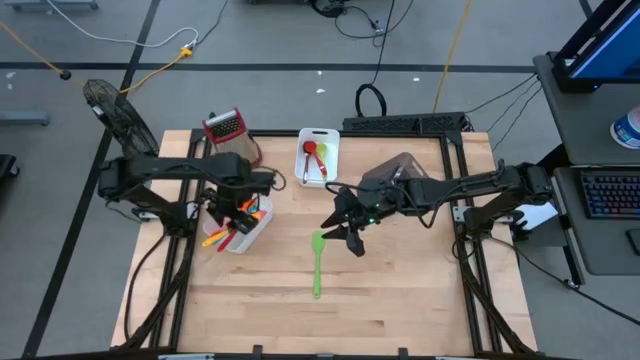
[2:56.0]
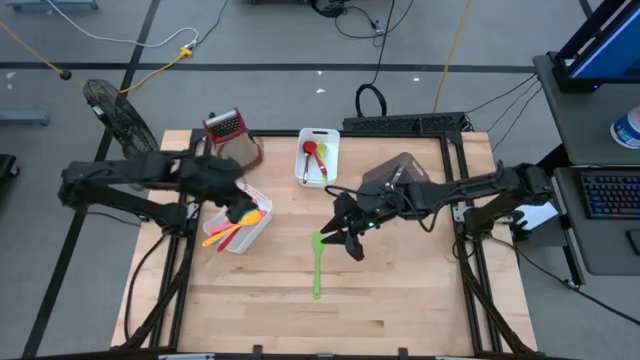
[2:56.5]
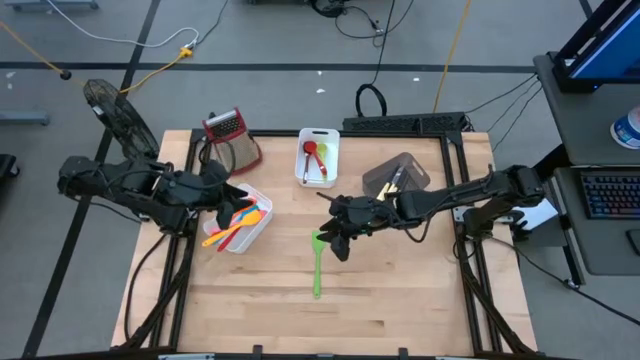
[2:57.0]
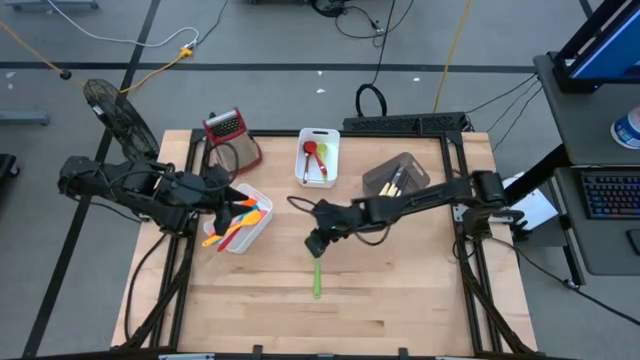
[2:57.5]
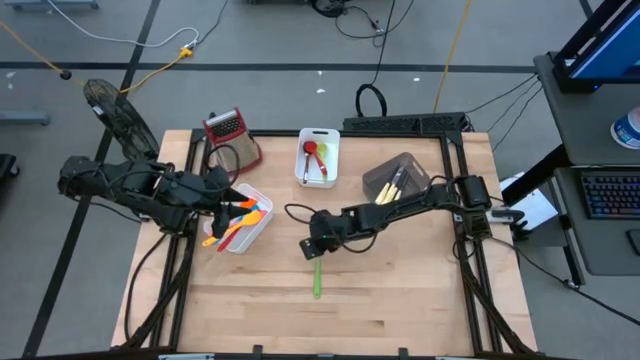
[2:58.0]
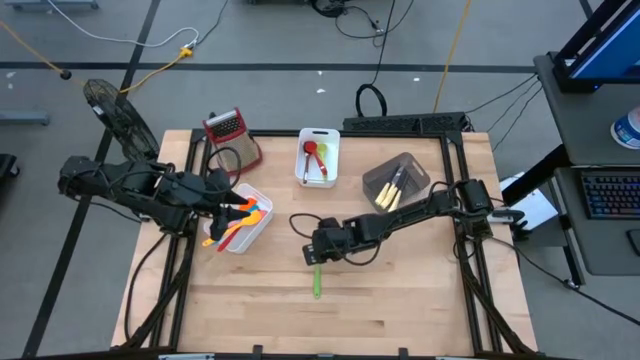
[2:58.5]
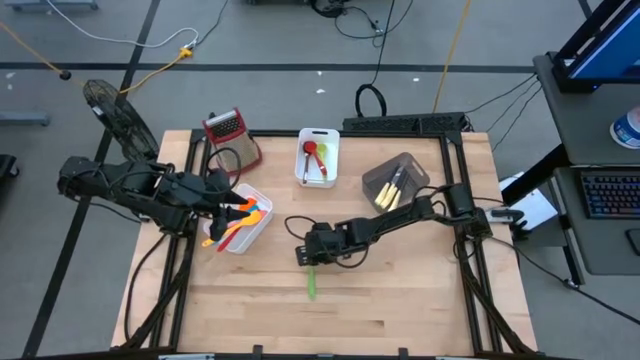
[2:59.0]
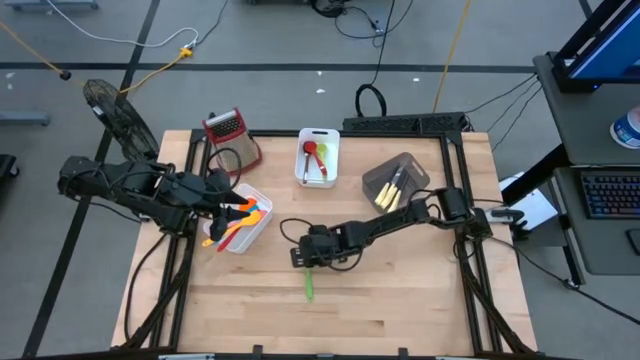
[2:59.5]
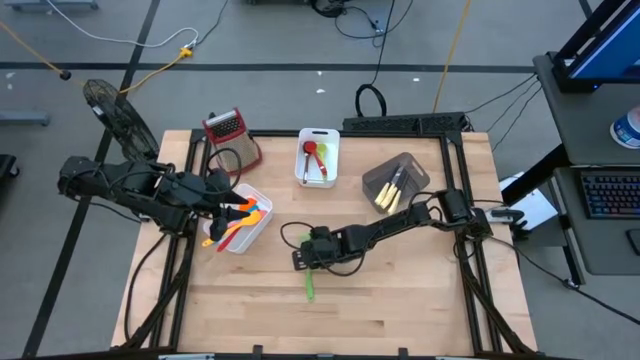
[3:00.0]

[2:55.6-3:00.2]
Task: Pick & Place Kitchen Items
Put the green spatula into the bottom white bin

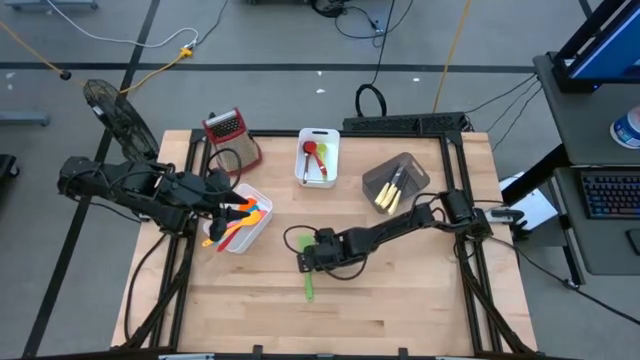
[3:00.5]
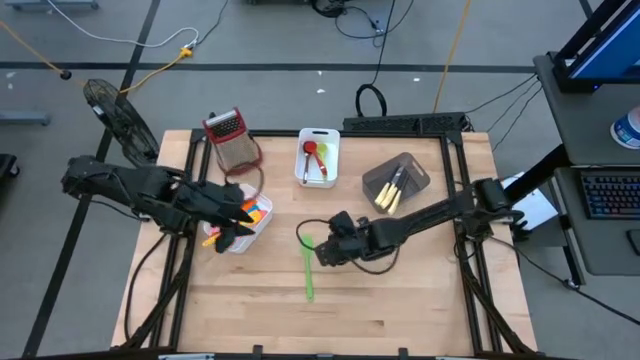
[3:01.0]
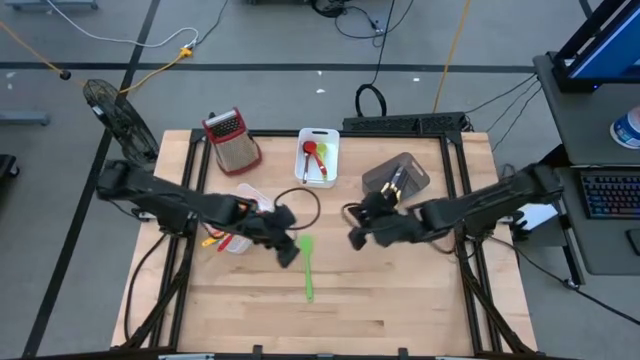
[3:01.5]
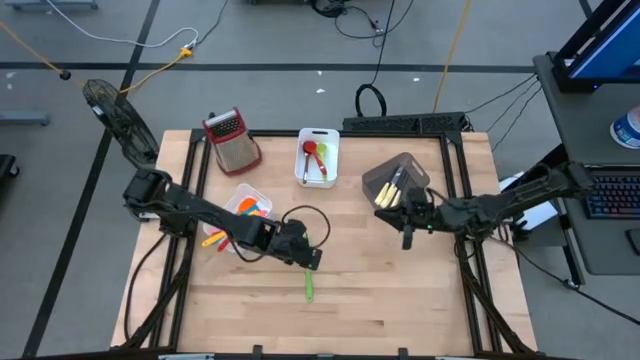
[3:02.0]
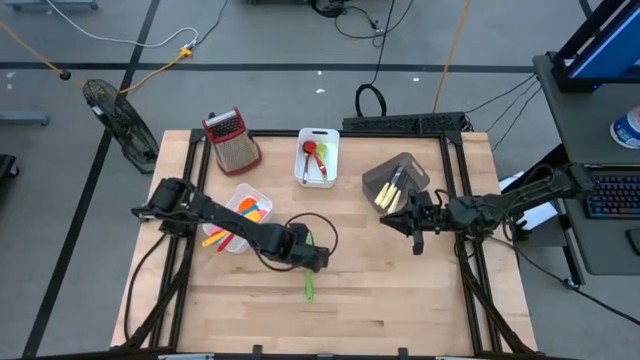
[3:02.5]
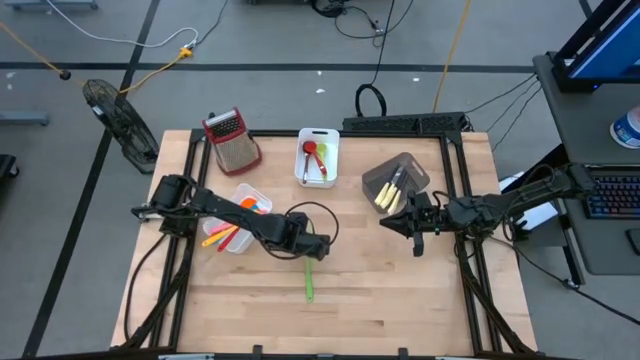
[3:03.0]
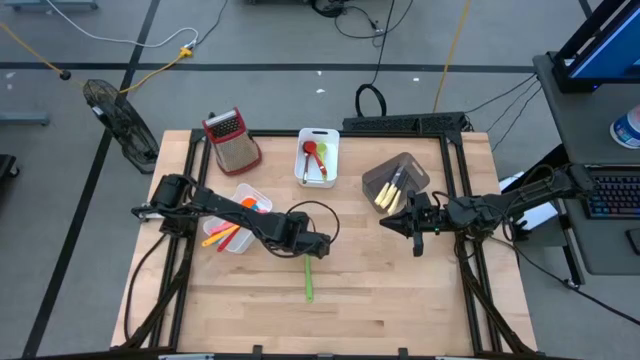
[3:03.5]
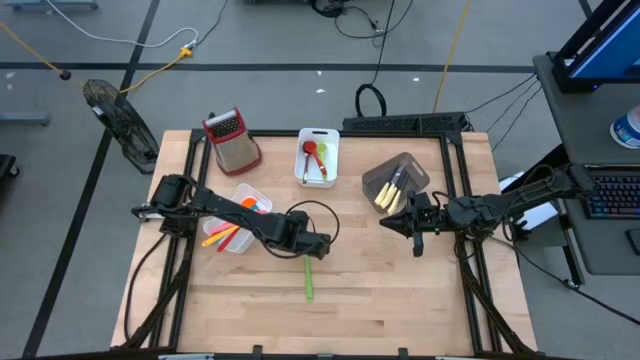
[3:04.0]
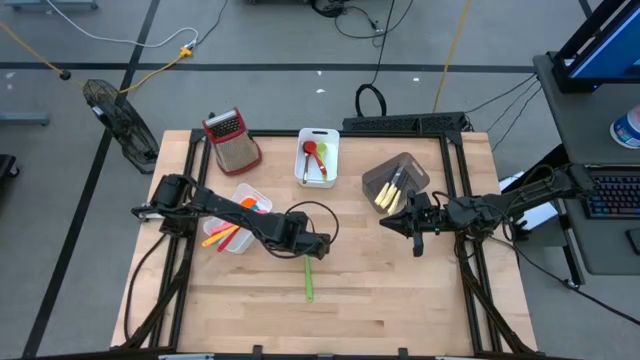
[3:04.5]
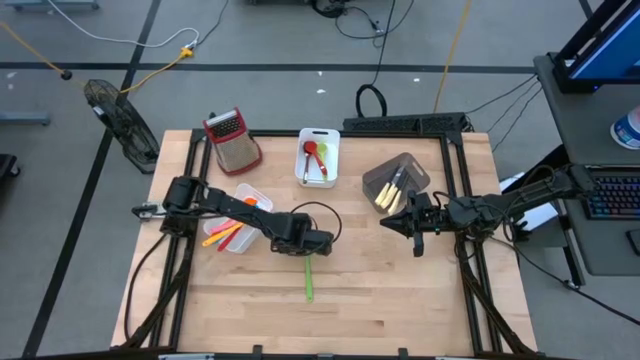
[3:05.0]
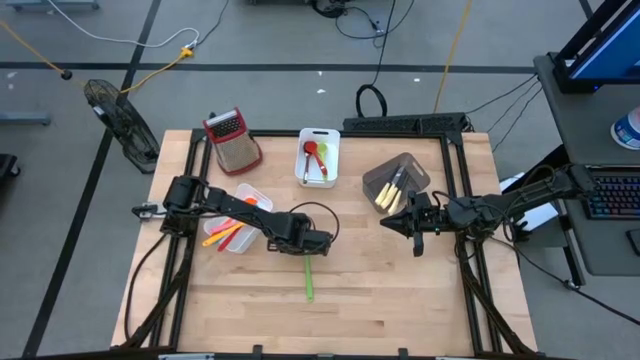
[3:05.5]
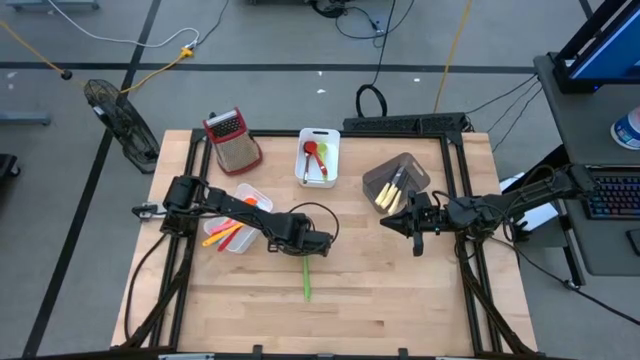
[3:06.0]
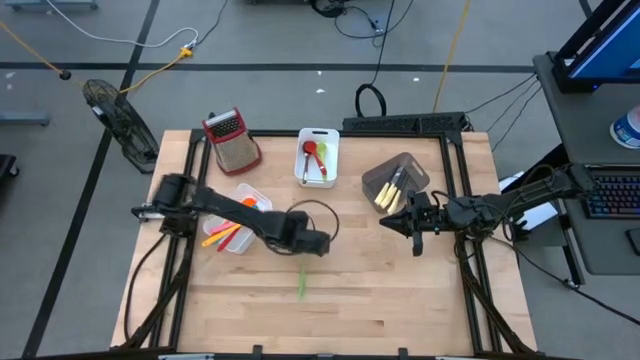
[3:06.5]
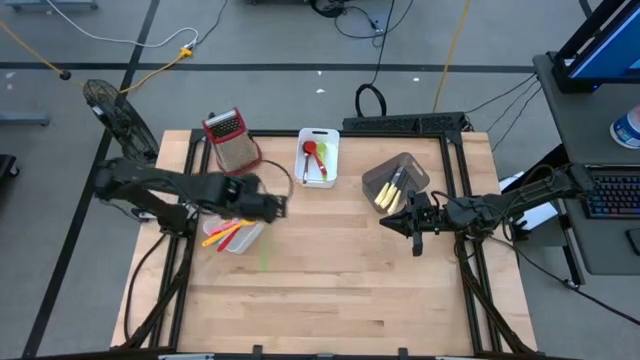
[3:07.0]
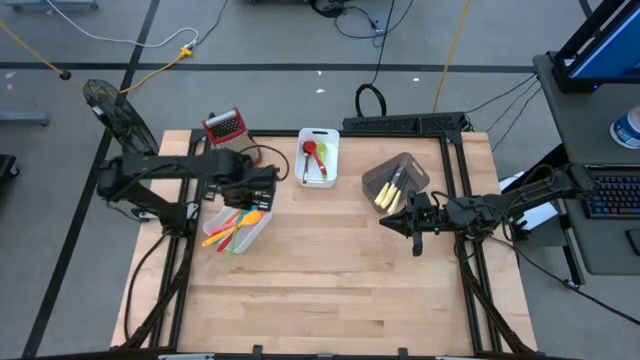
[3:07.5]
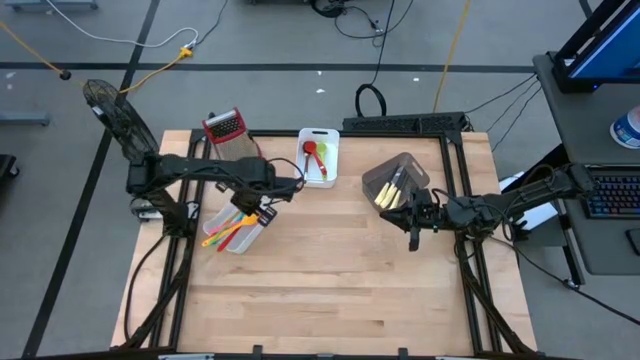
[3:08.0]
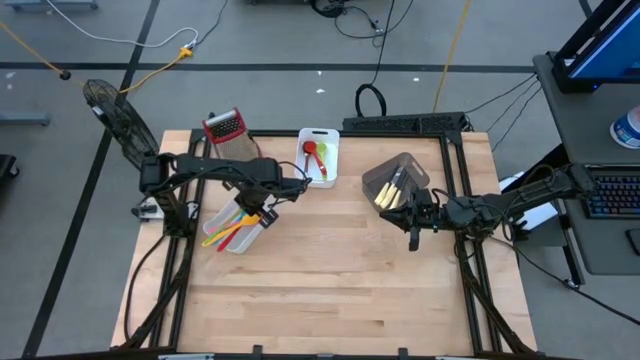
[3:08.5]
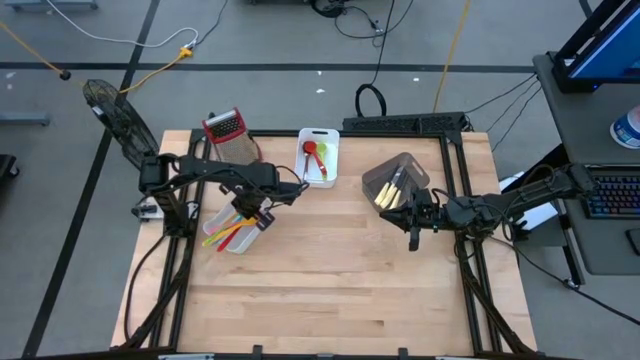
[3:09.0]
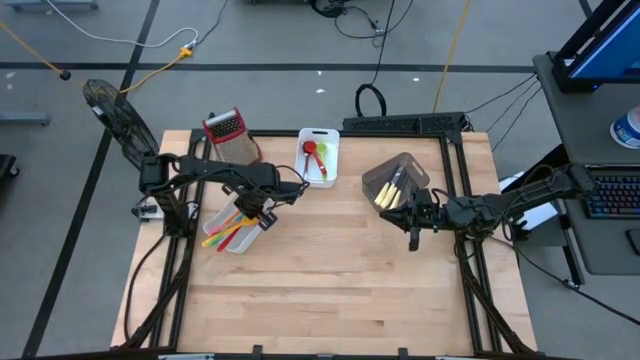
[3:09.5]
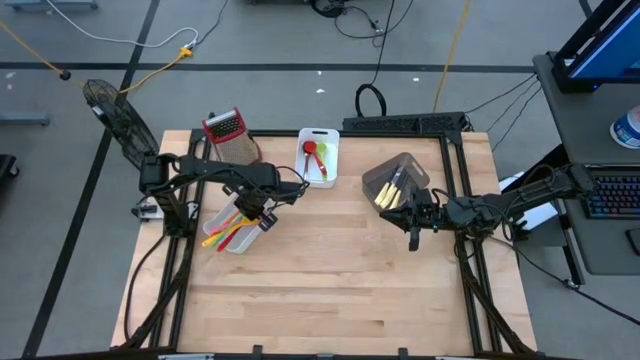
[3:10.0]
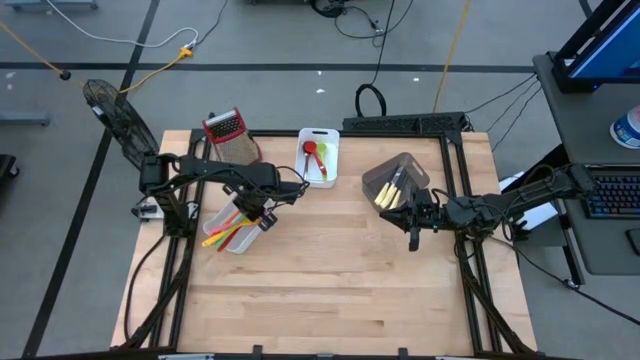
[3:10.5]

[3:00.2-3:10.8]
Put the green spatula into the bottom white bin

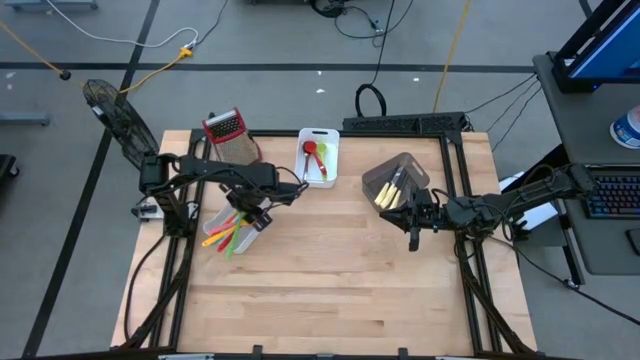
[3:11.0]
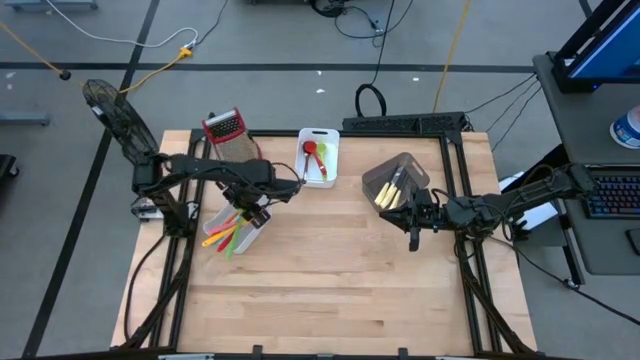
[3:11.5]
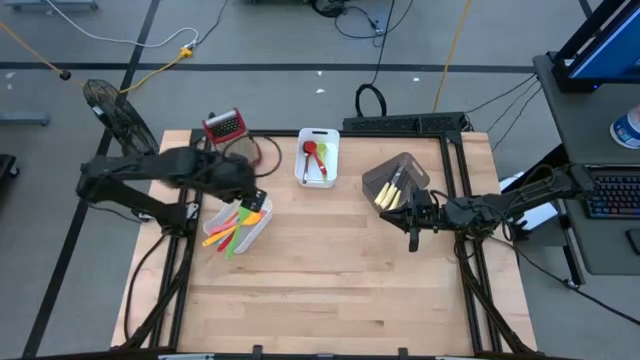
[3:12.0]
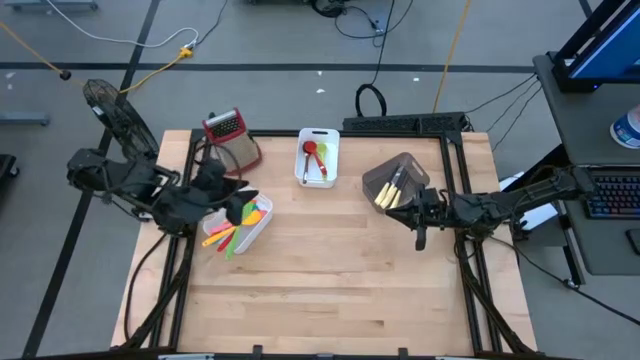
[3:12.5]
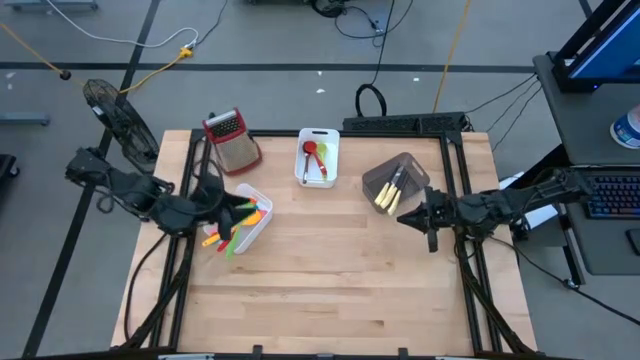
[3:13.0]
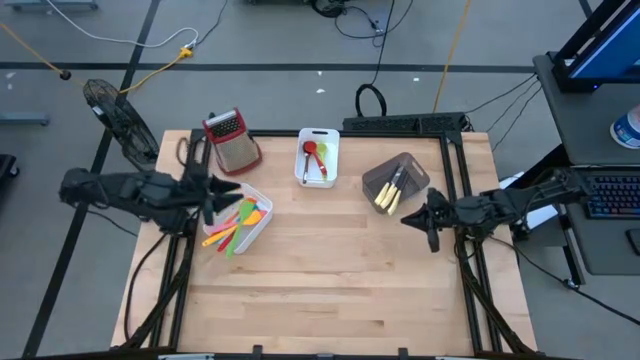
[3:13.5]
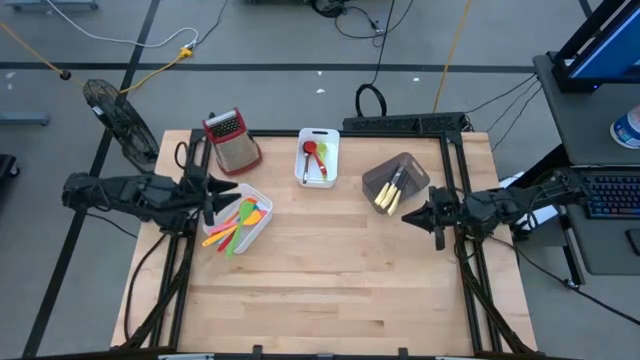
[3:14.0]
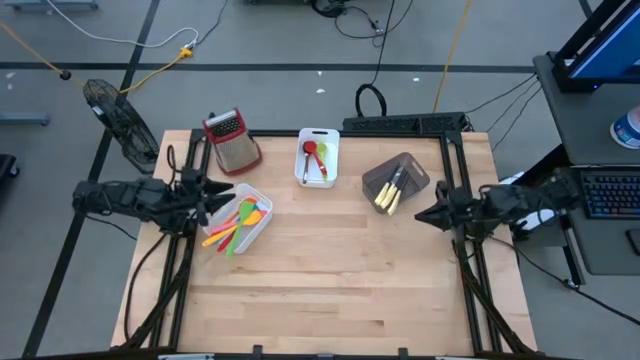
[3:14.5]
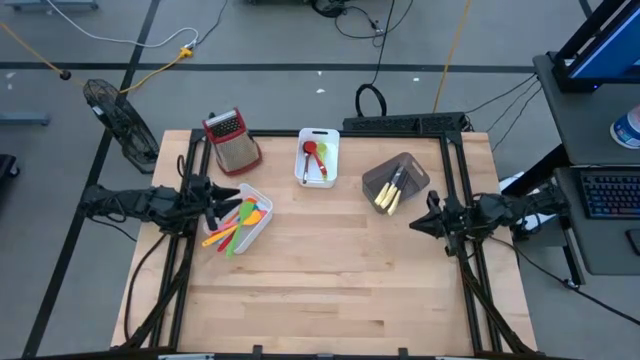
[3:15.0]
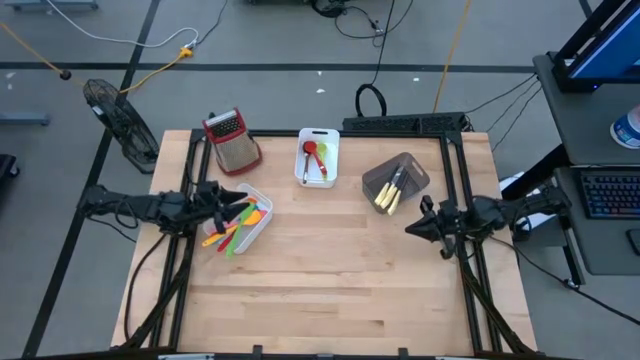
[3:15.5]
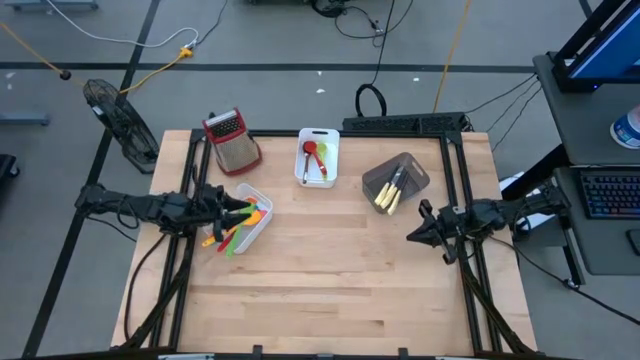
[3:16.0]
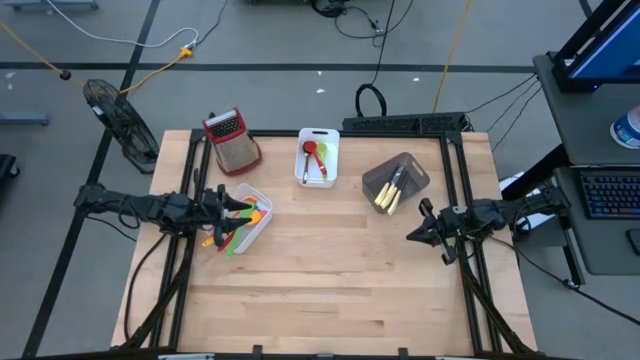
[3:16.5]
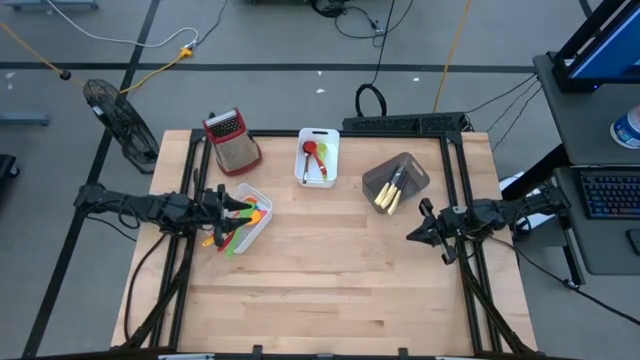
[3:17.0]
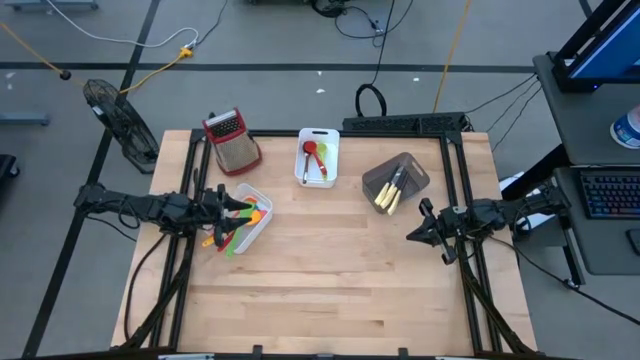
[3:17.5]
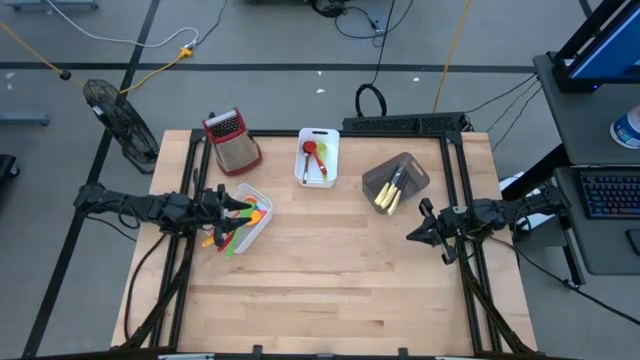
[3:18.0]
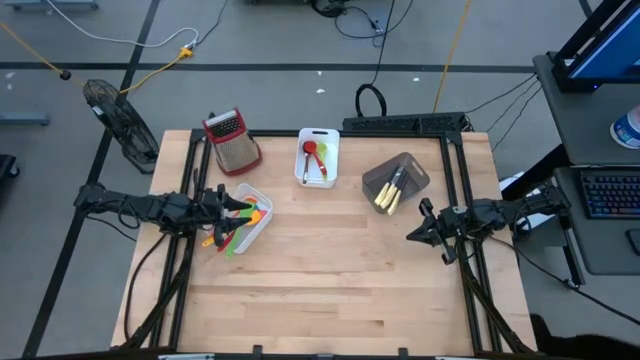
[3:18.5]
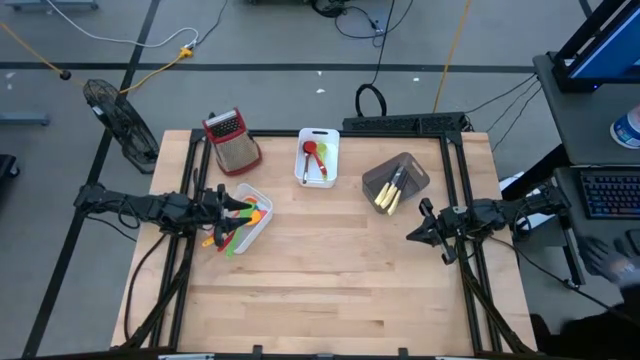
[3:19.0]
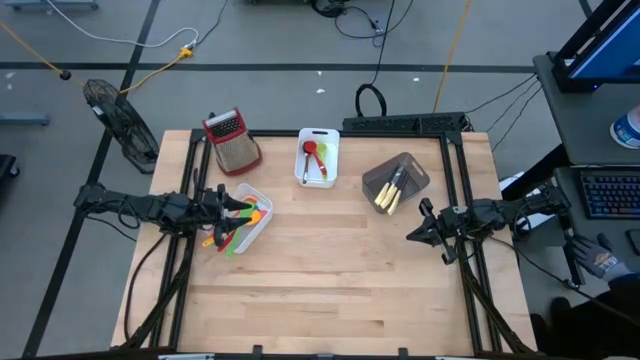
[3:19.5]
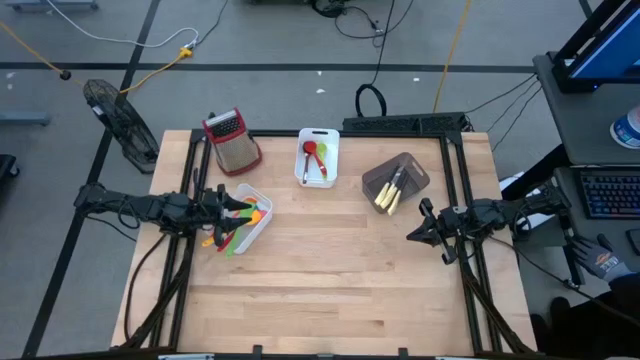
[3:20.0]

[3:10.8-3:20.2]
Return to Home Position
